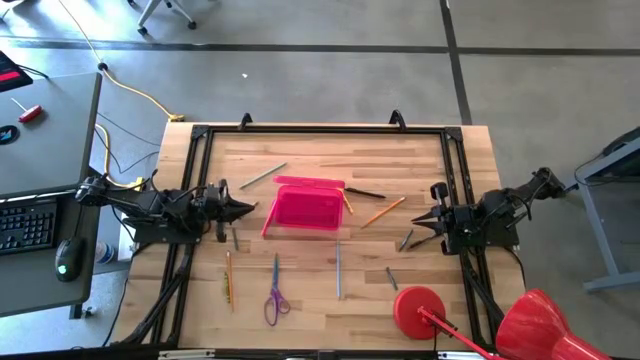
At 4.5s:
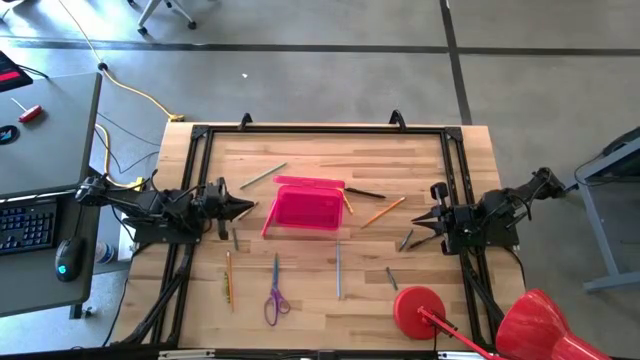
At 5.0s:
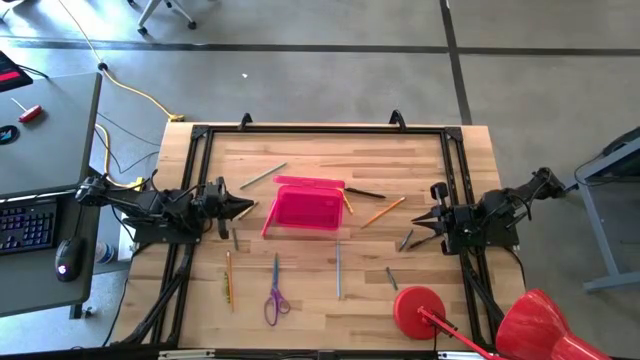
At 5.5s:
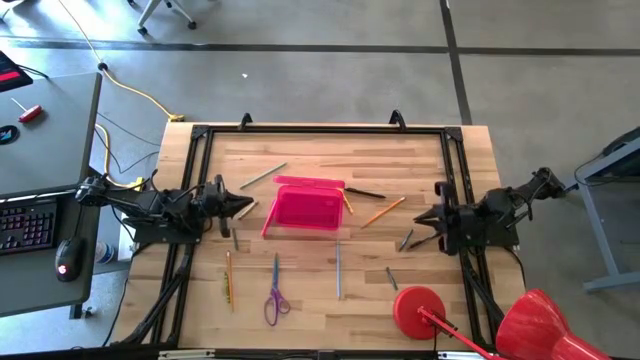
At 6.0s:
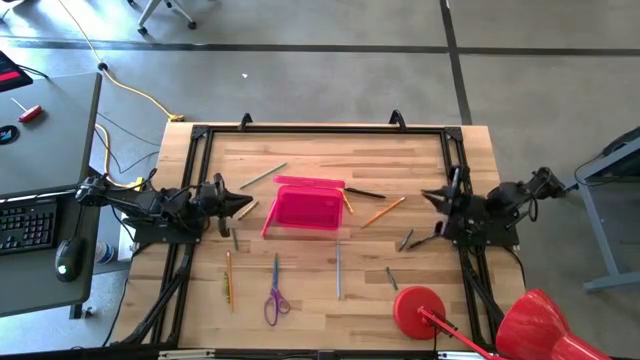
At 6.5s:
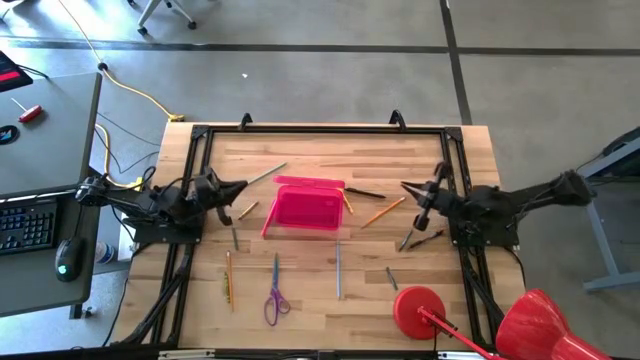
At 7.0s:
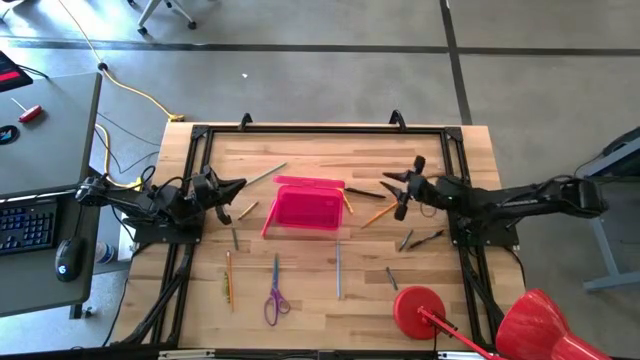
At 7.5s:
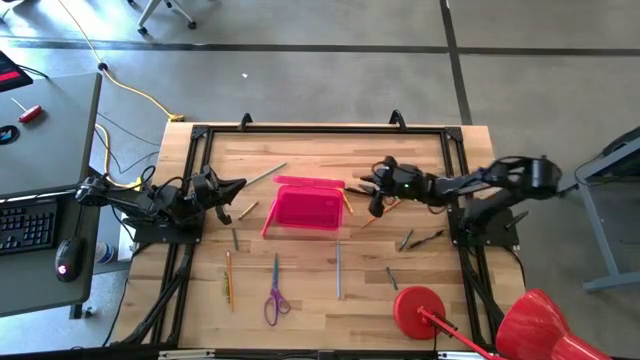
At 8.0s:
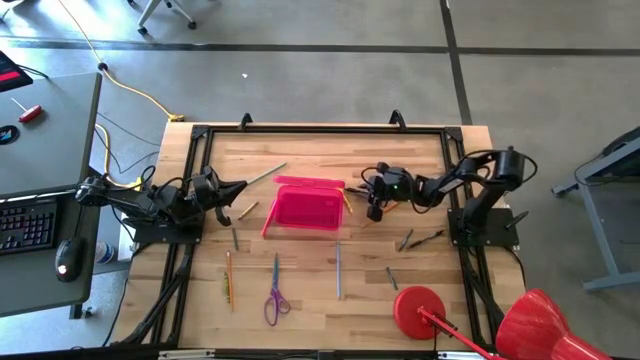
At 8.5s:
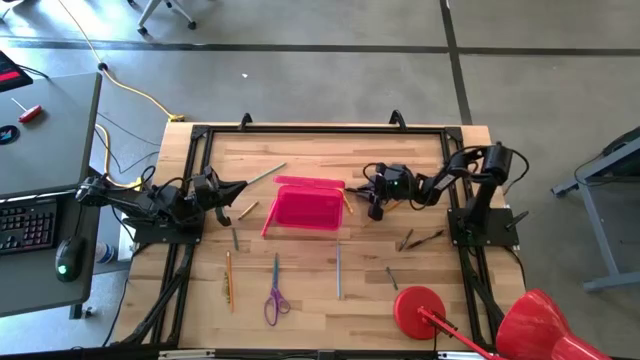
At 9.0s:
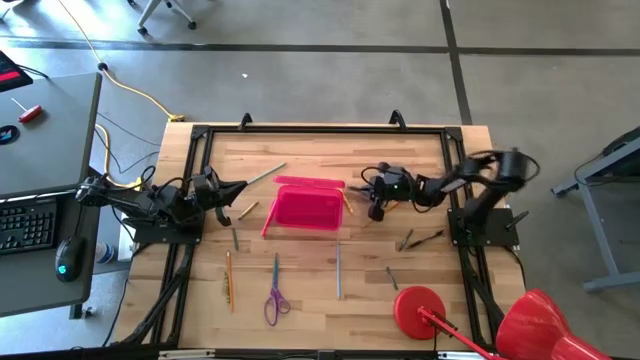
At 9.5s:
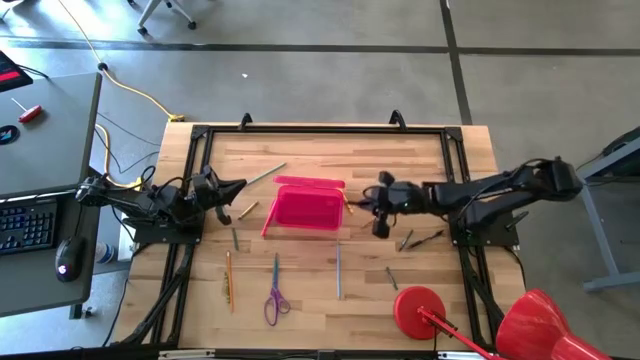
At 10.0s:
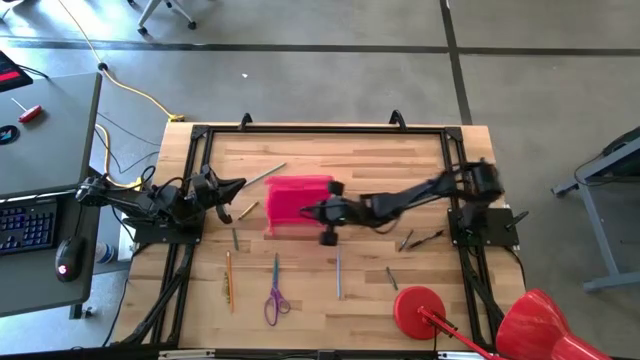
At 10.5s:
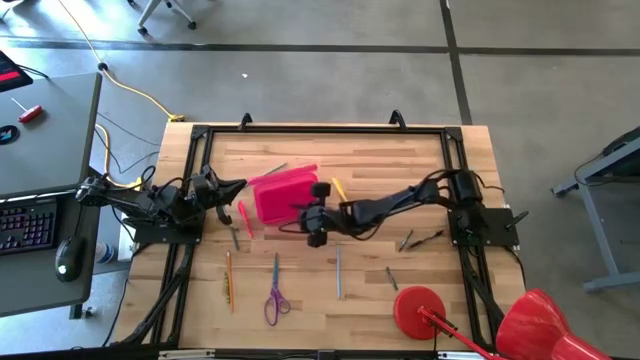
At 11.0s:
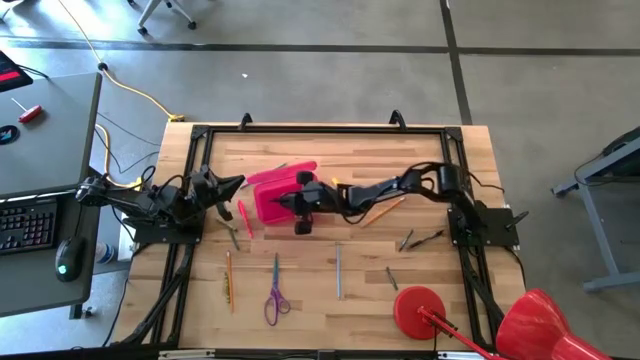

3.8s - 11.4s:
Task: Pick & place school supplies into a supply box
Put the black pen into the supply box

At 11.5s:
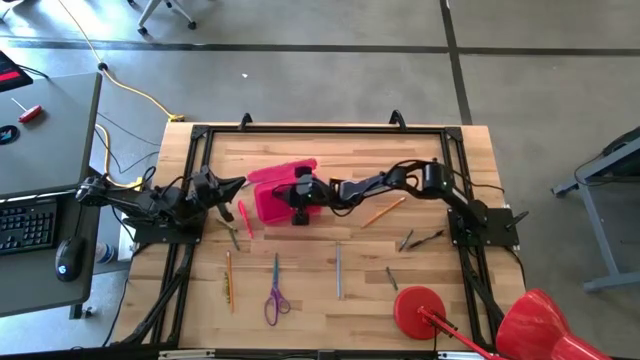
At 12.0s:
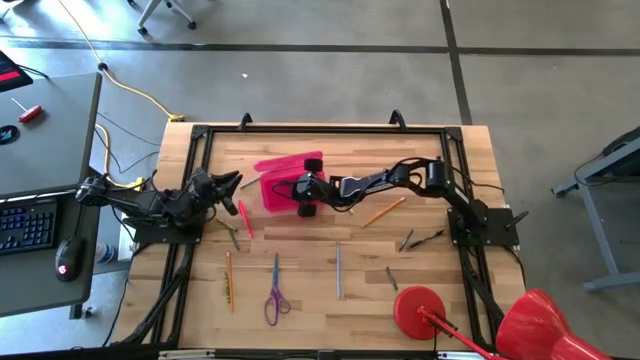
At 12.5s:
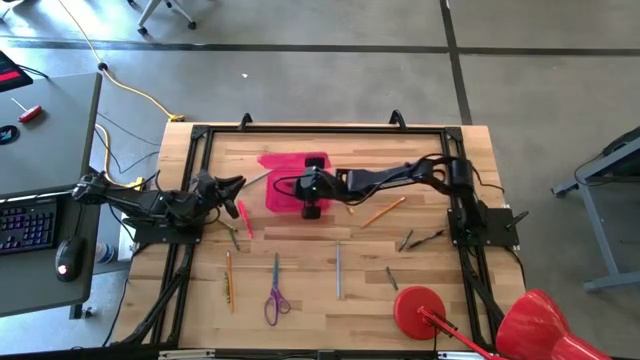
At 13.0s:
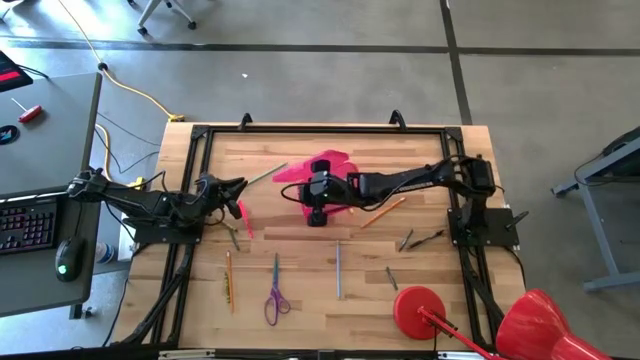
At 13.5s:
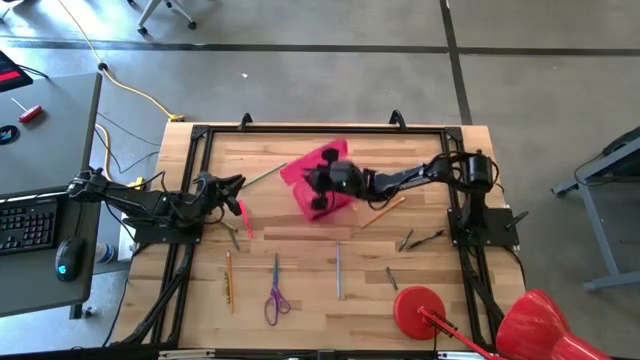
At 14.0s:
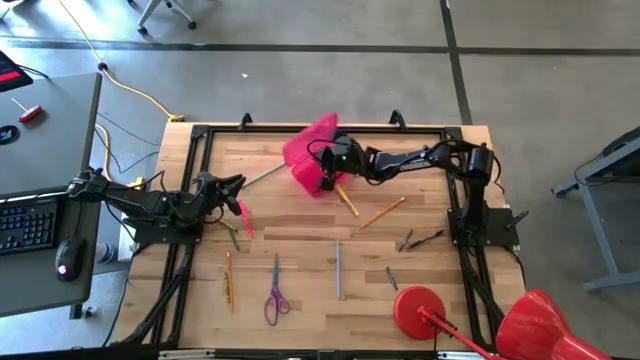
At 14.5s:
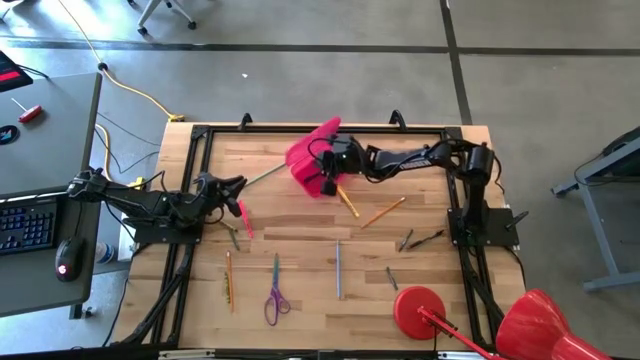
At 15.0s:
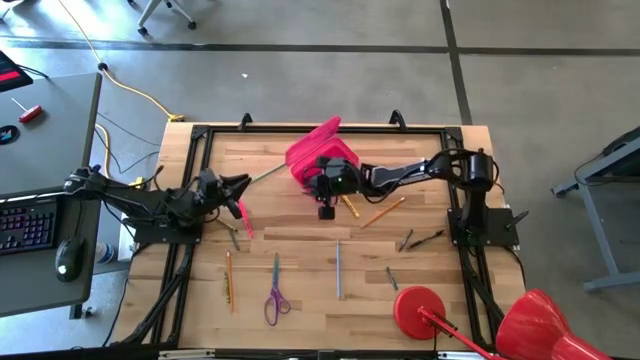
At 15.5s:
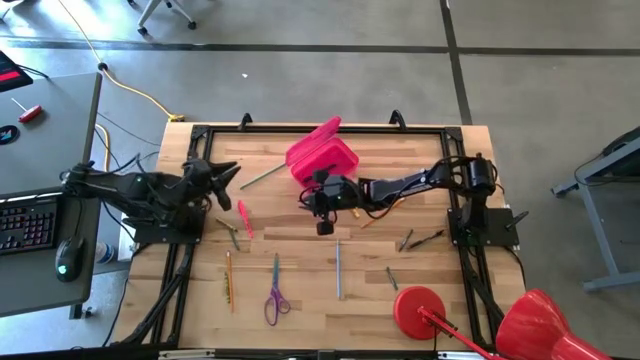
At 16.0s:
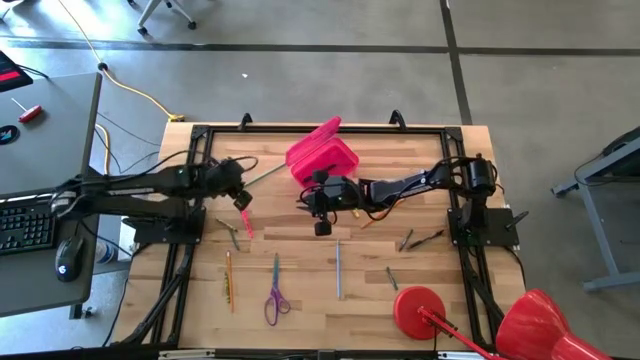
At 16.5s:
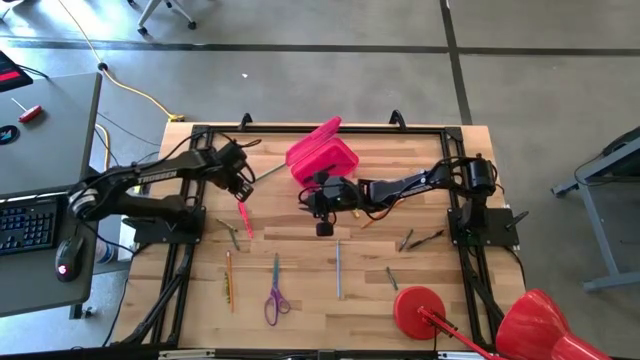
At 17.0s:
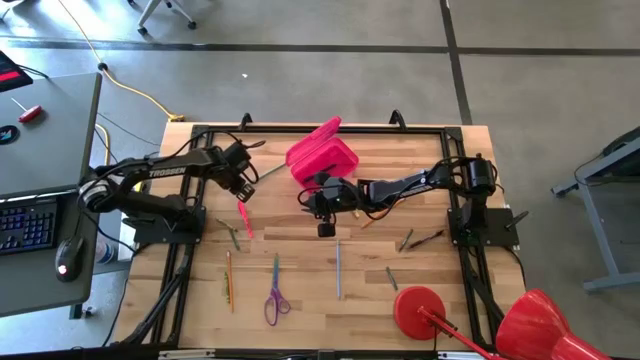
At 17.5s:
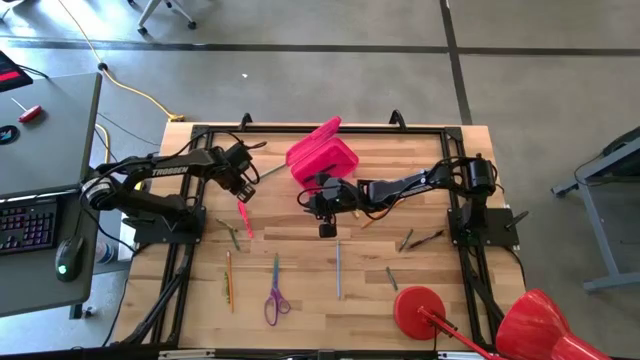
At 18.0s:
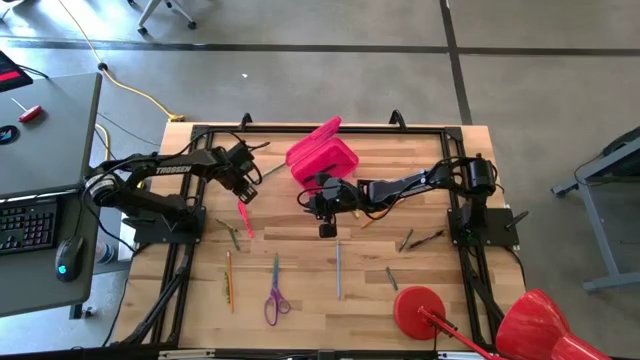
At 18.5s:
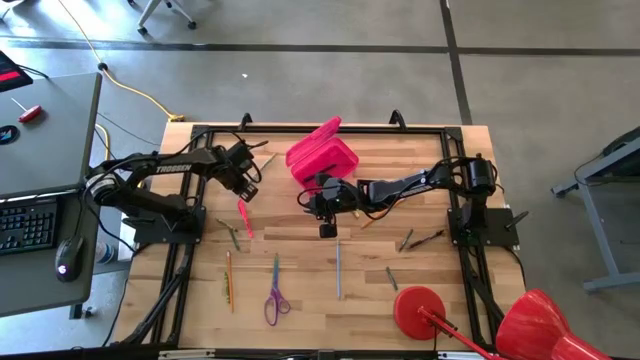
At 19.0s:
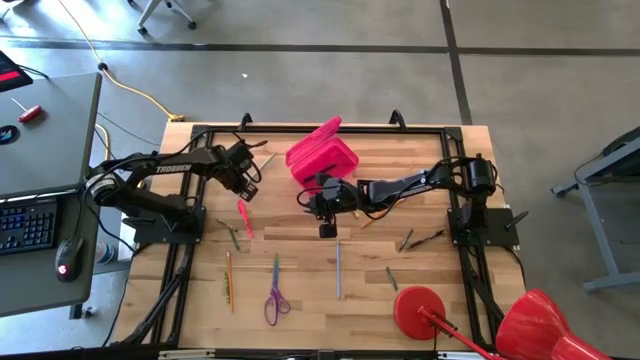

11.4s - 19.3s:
Put the top blue pencil into the supply box

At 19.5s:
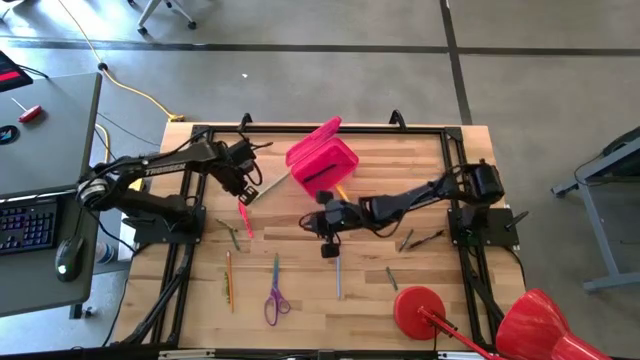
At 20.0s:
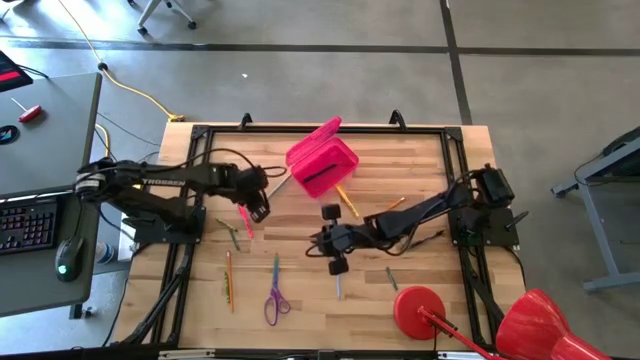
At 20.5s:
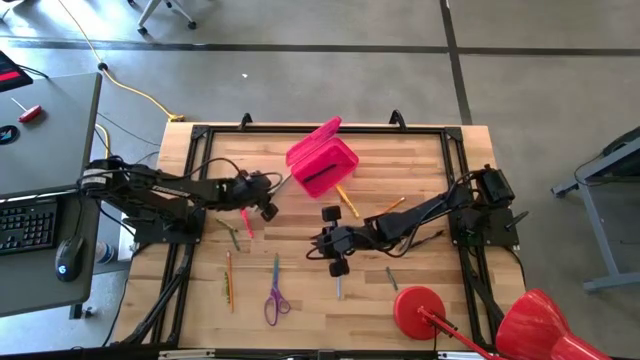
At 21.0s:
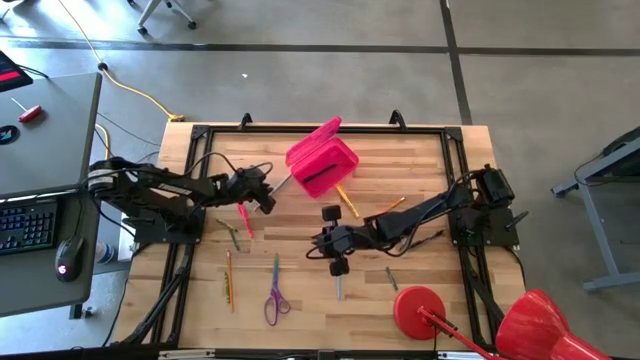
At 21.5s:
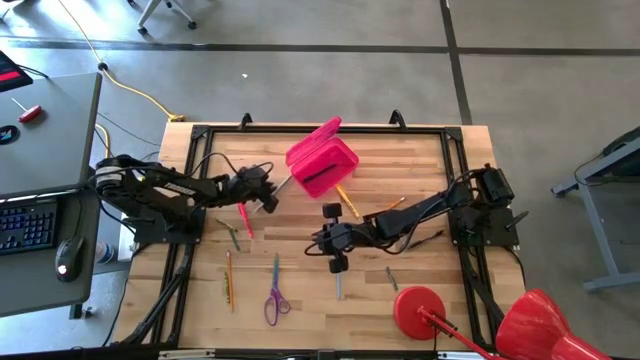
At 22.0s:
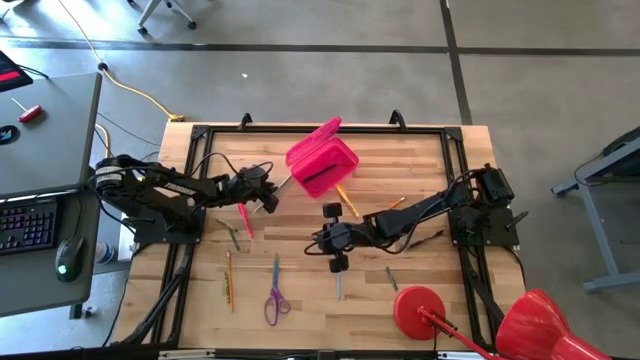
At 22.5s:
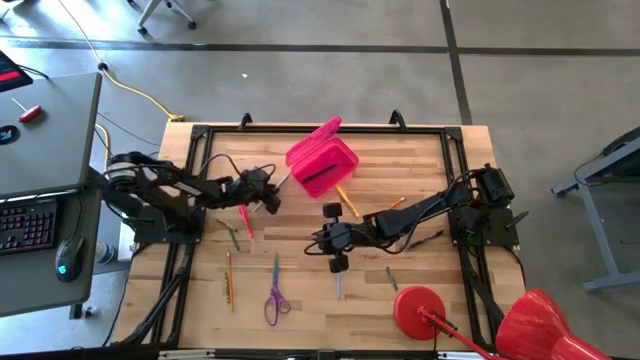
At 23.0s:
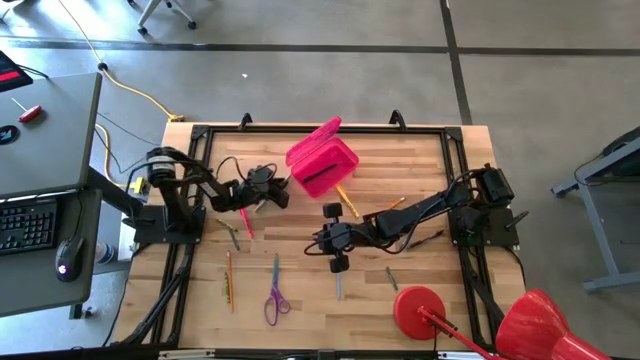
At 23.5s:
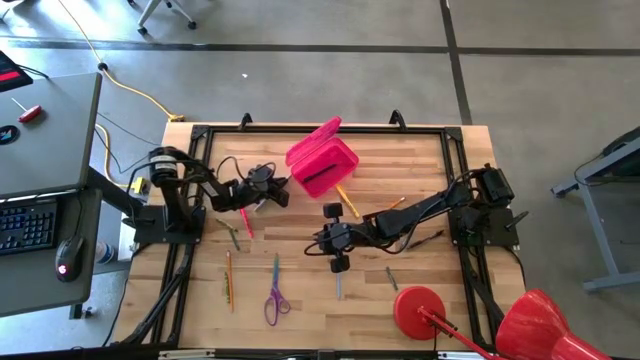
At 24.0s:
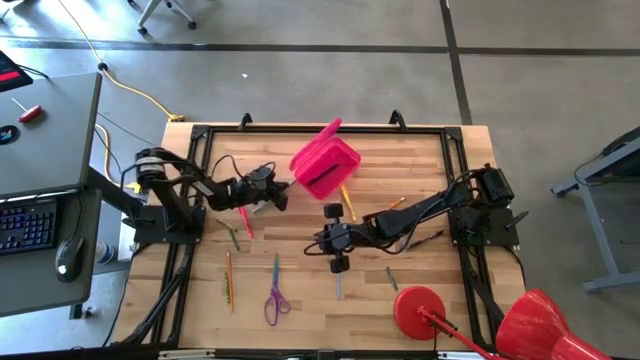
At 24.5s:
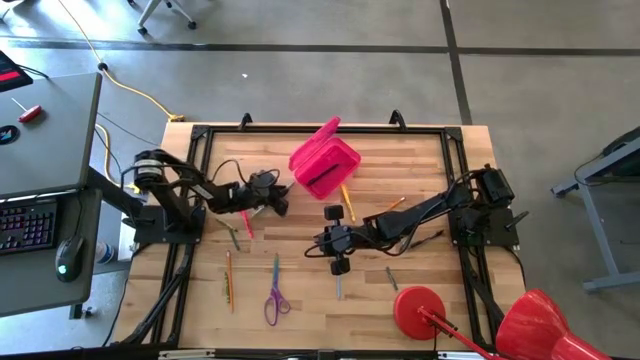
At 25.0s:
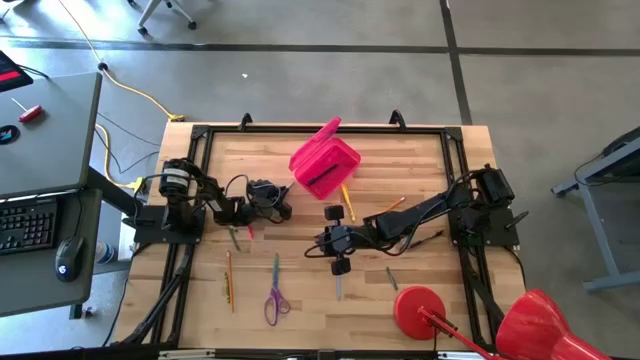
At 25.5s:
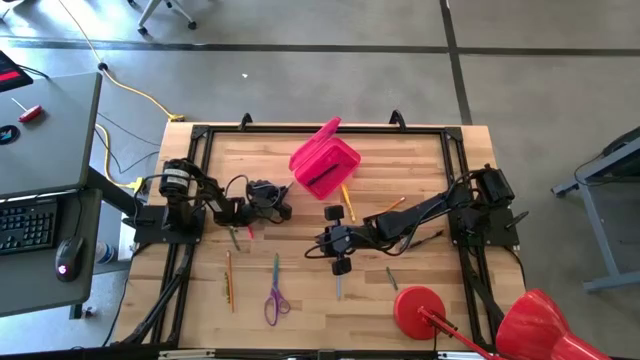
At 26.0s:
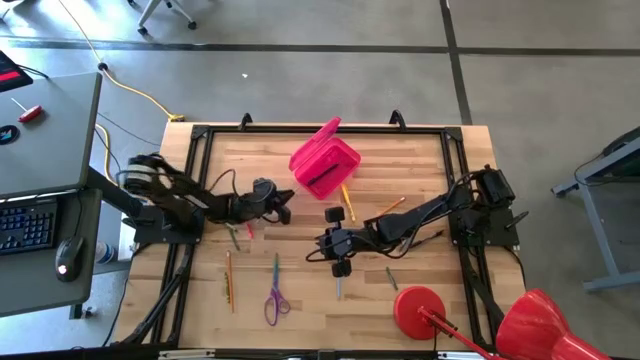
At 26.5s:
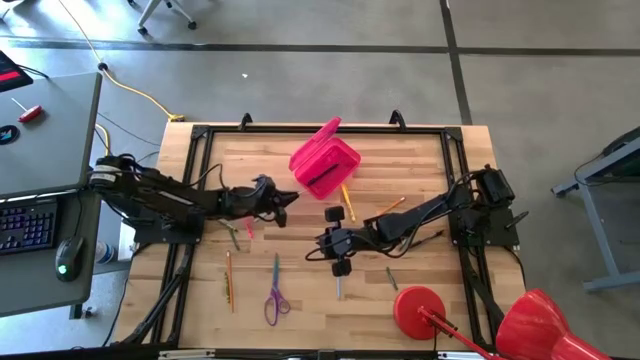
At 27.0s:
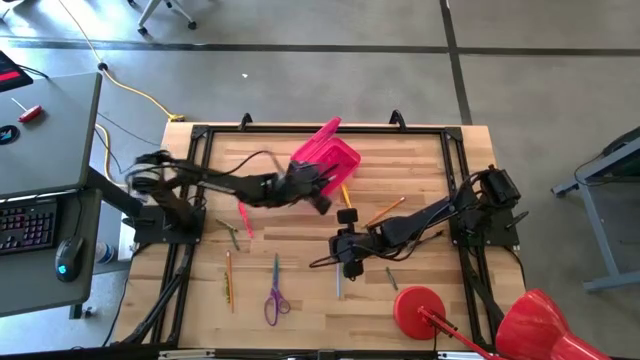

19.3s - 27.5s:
Put the top blue pencil into the supply box
